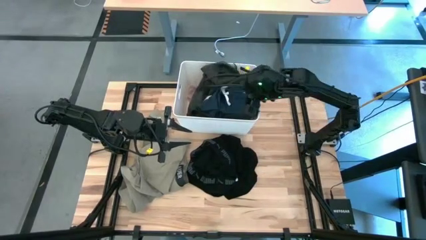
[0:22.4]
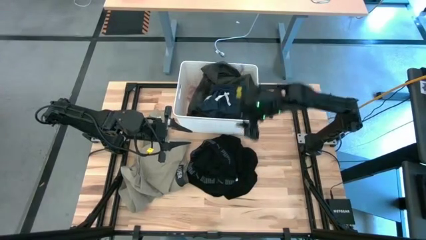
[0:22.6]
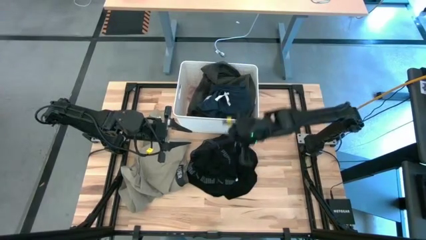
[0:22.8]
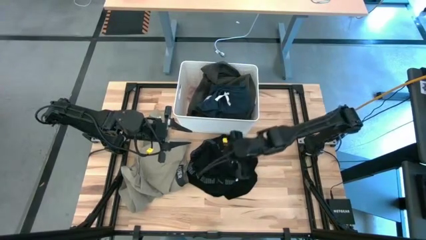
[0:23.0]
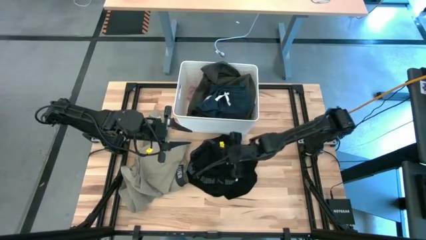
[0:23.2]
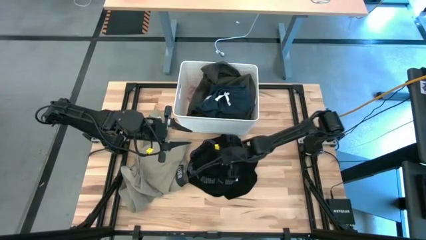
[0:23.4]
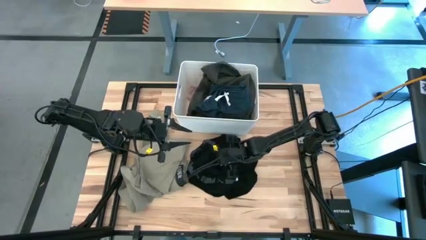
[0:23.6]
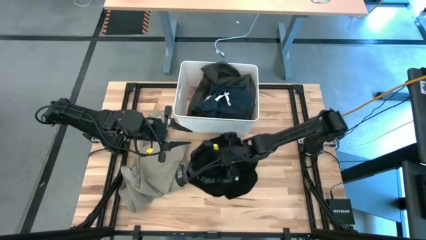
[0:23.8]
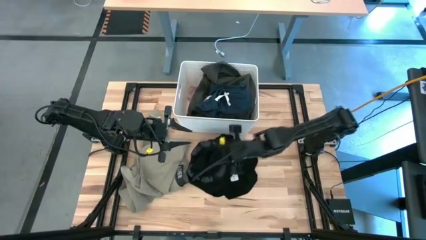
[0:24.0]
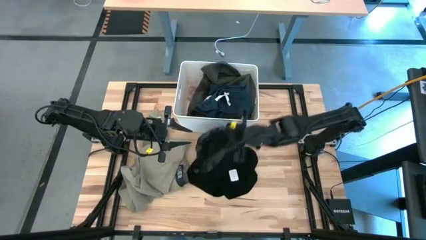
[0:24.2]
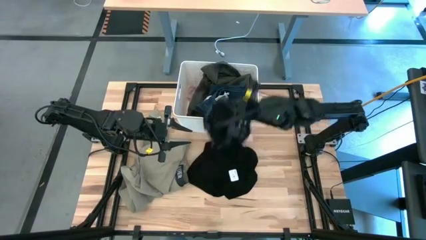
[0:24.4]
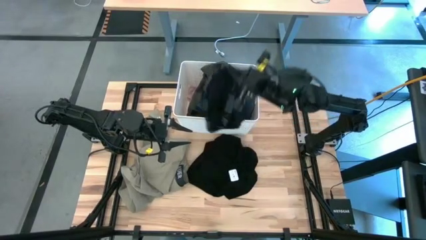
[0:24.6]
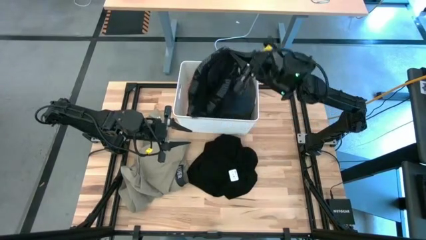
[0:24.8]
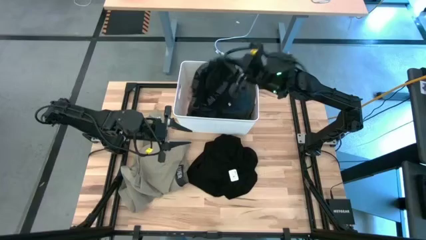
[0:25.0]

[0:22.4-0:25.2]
Task: Sort clothes
Put the black boxer into the white laundry bin

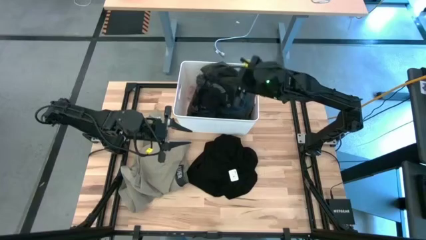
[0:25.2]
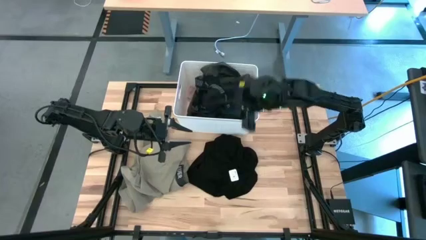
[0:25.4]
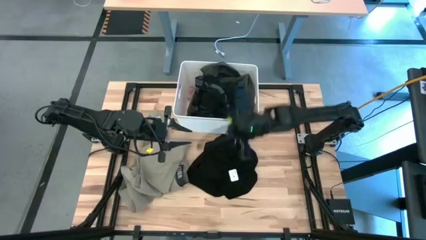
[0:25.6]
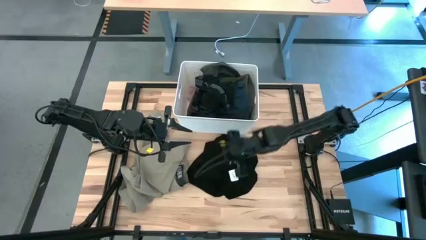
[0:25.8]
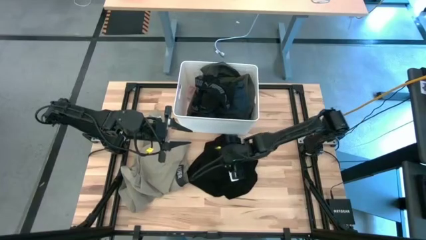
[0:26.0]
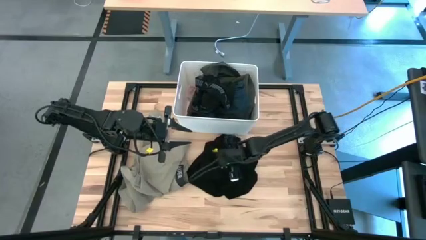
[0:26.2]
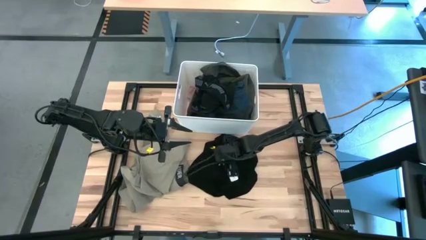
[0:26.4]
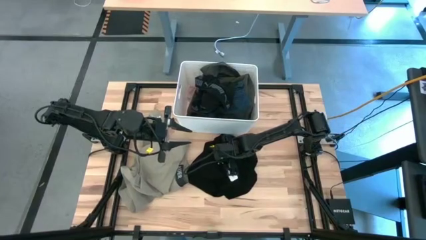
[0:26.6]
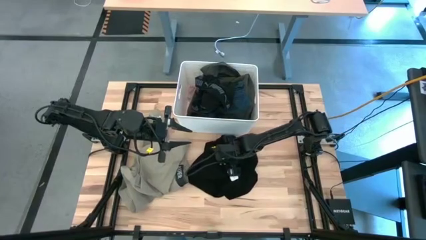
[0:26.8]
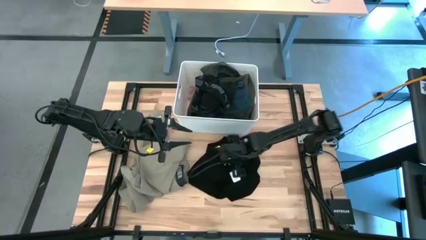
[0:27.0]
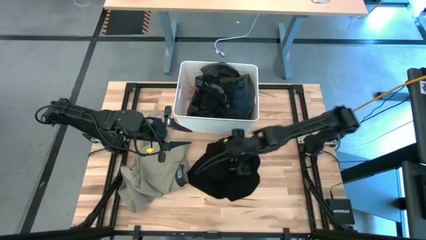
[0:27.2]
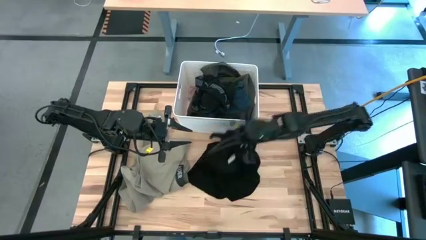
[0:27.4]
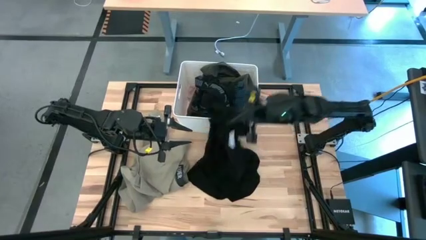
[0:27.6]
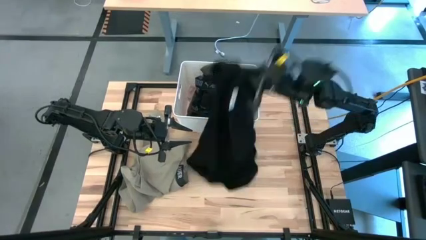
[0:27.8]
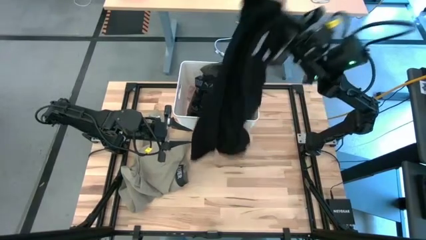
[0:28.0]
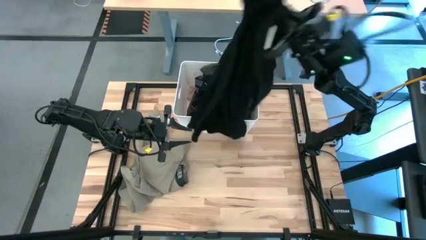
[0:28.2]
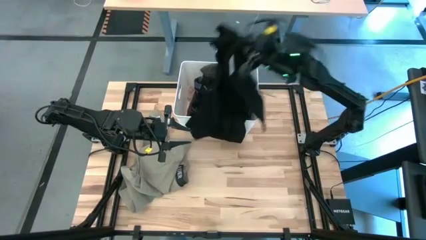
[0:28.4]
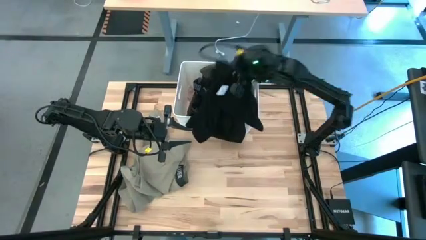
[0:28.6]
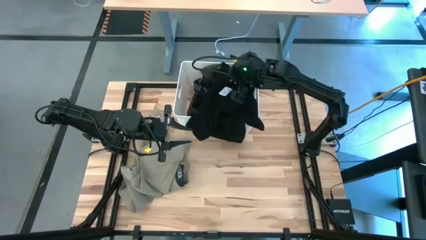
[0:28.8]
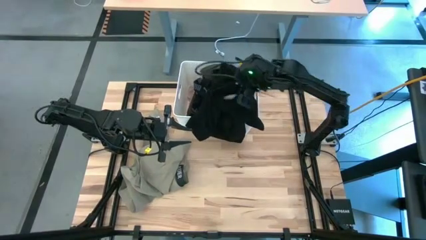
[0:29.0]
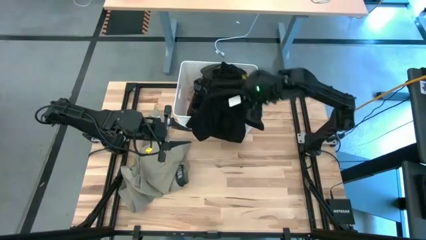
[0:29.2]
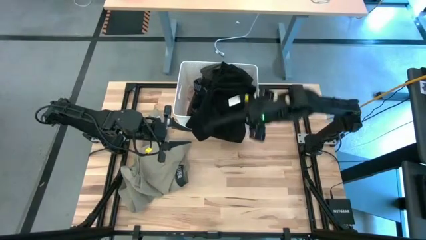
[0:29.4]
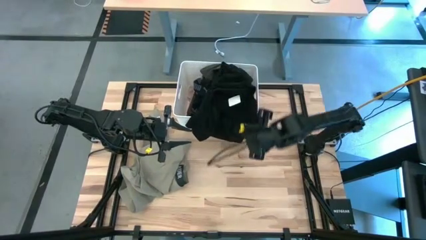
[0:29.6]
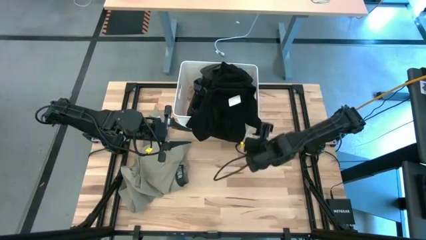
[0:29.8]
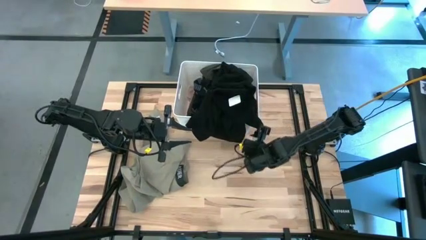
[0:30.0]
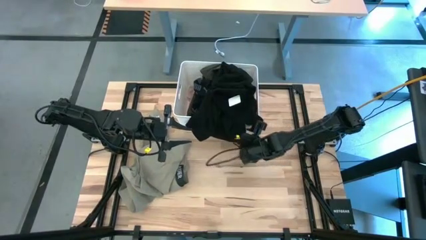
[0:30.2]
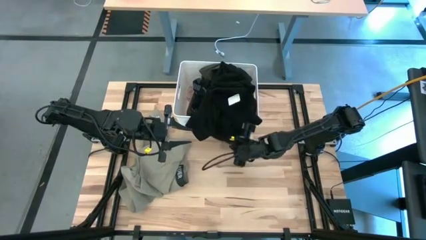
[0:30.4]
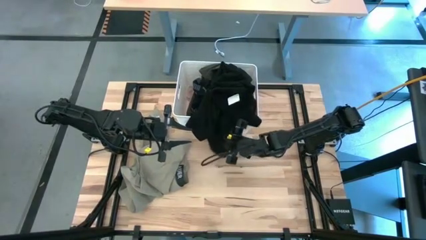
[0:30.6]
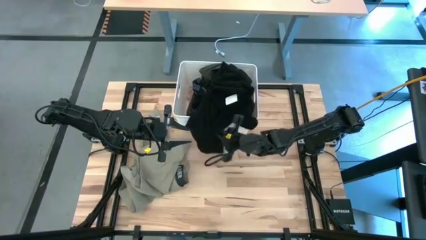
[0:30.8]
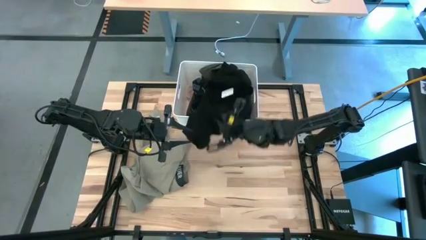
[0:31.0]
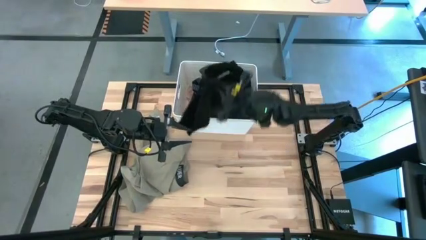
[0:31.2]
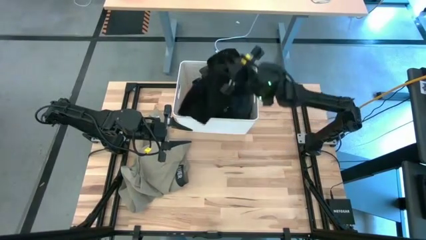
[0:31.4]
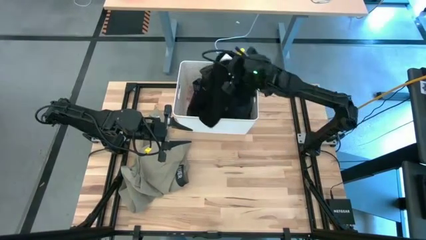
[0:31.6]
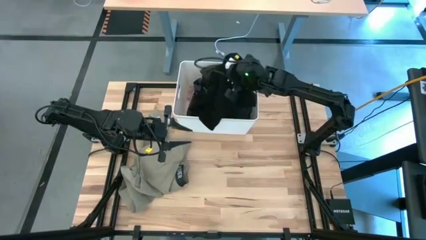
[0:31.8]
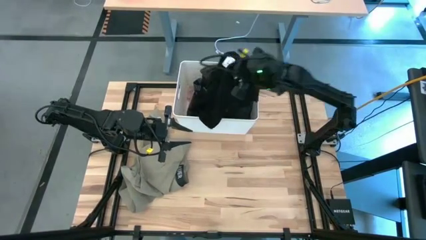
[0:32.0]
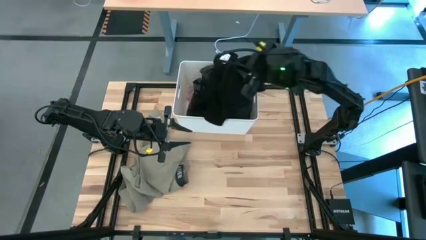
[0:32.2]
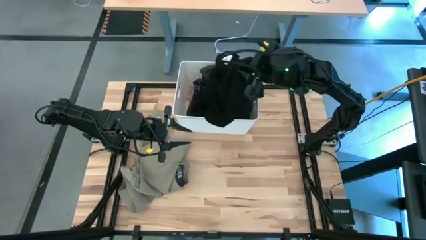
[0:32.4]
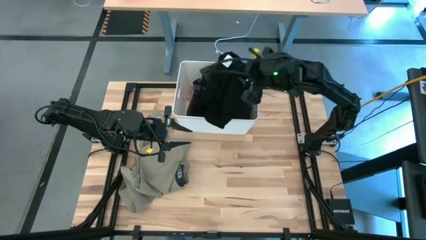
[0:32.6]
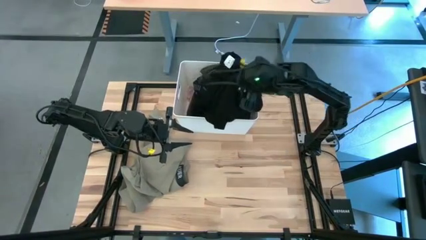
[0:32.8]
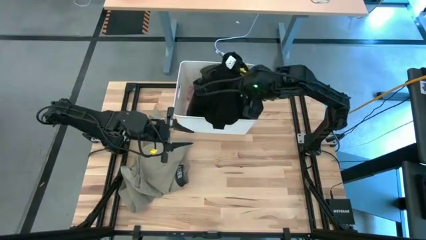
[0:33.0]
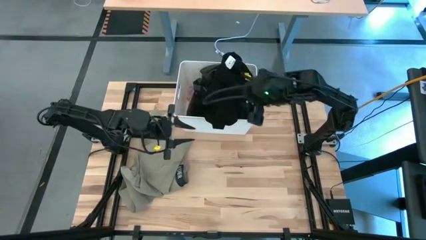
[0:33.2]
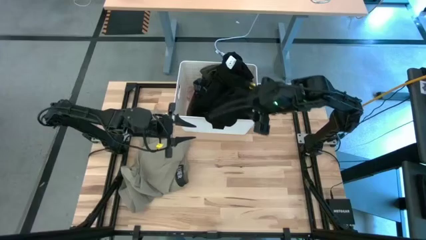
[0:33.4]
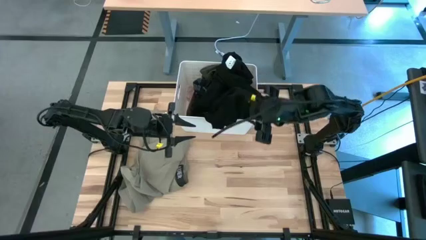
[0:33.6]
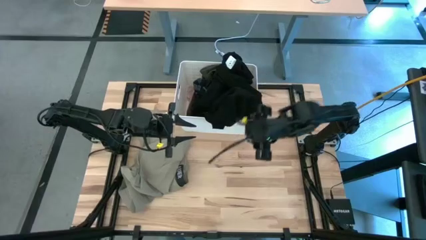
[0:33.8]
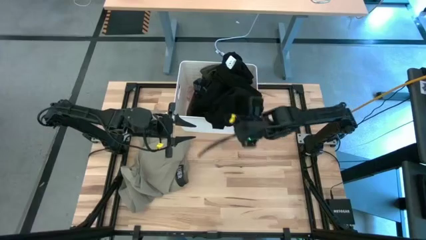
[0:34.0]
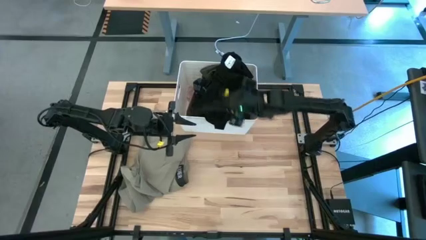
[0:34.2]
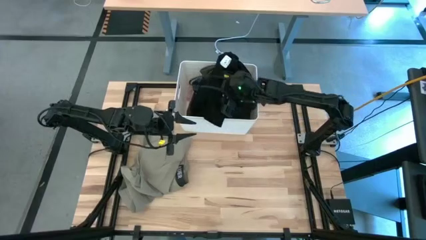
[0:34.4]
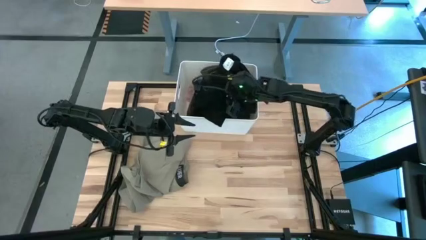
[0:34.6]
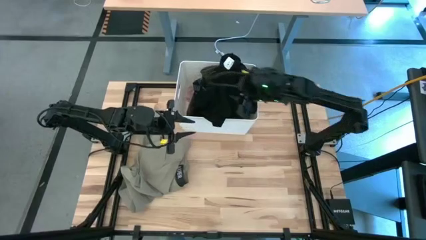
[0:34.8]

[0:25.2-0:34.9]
Put the black shirt into the white laundry bin

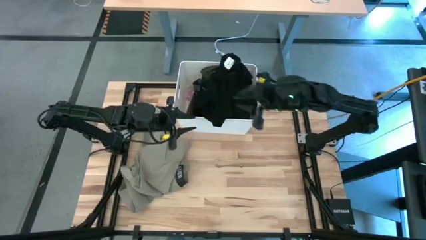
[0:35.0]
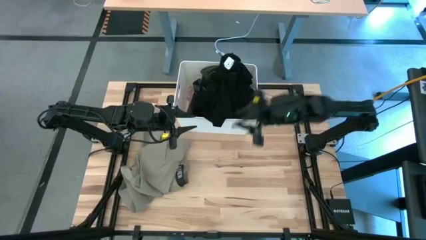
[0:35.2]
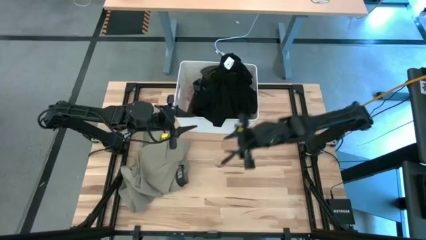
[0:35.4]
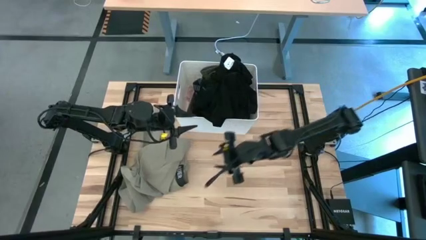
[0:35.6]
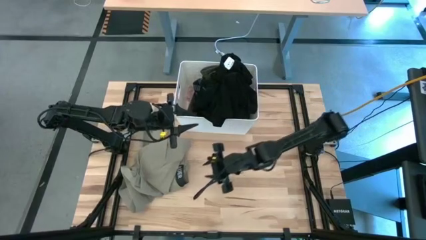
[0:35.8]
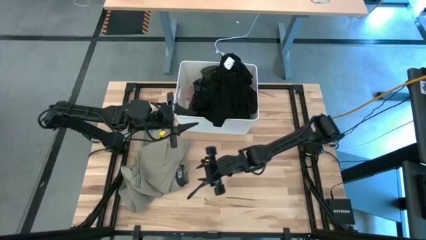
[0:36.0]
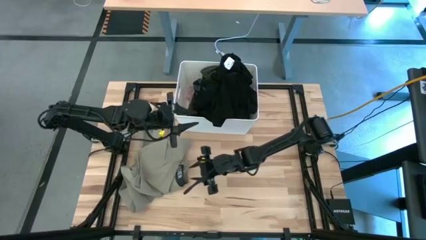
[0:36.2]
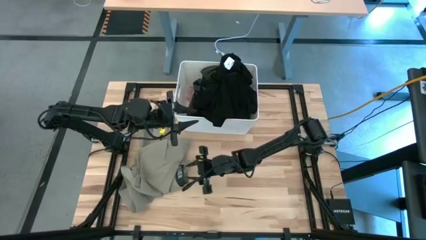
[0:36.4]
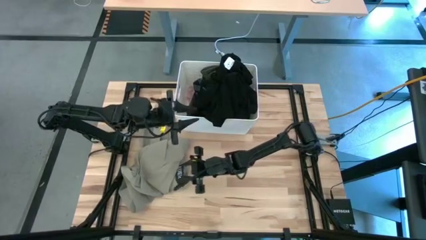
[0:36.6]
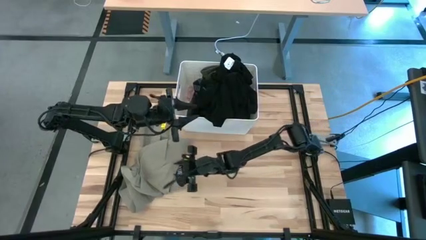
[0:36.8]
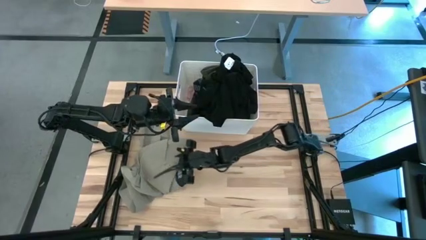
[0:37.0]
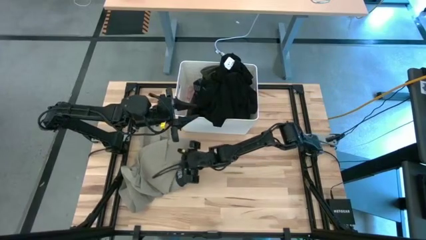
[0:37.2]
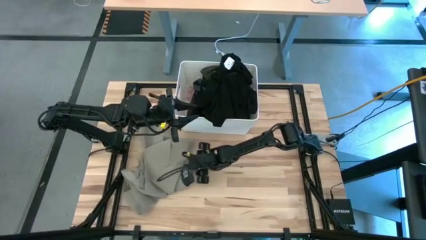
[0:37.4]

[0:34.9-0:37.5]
Put the brown short into the white laundry bin
